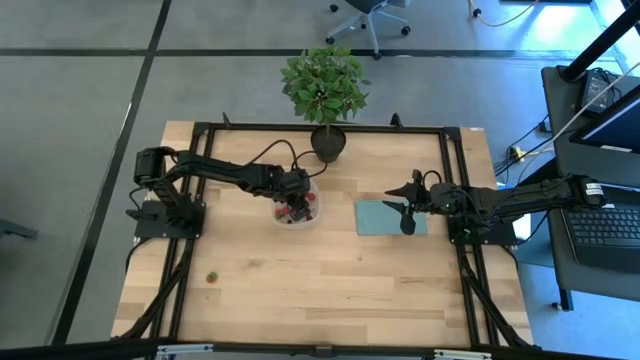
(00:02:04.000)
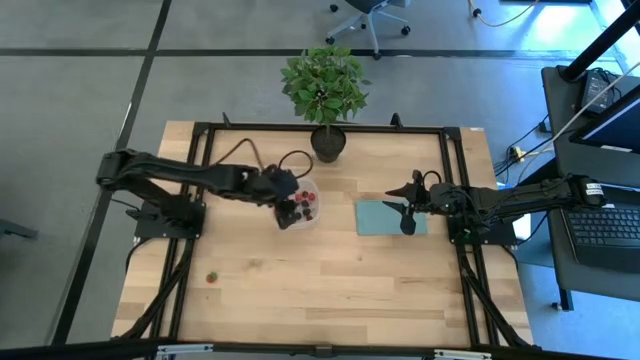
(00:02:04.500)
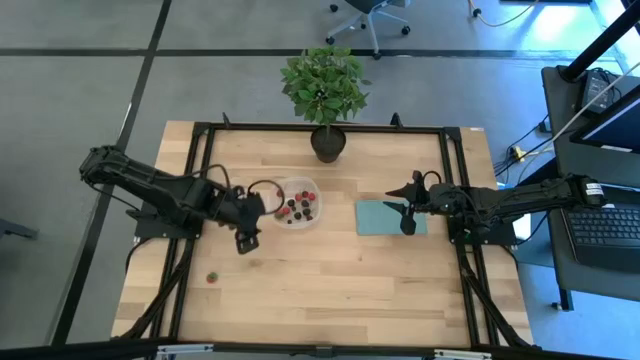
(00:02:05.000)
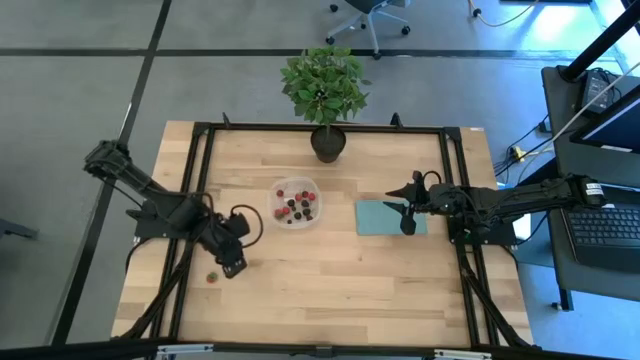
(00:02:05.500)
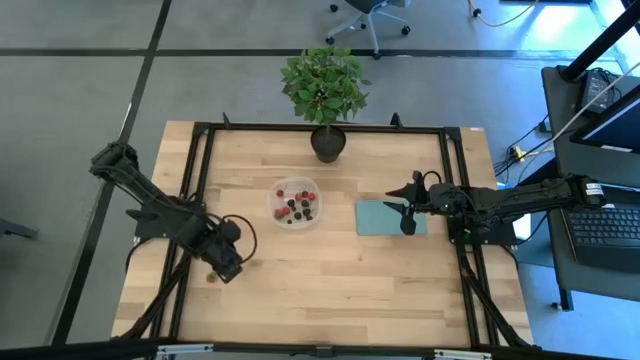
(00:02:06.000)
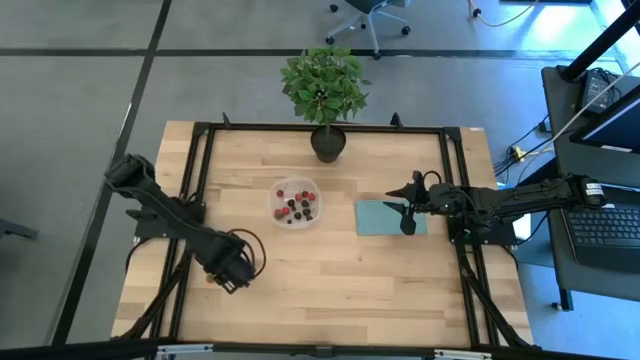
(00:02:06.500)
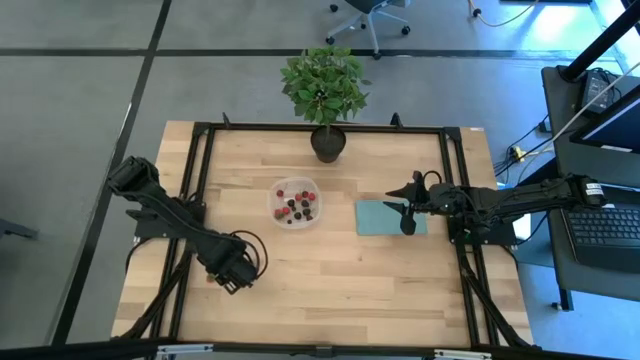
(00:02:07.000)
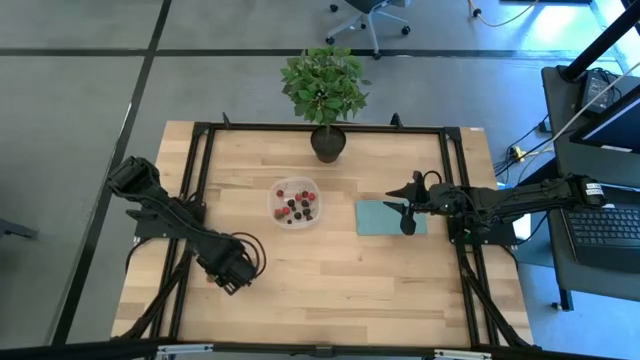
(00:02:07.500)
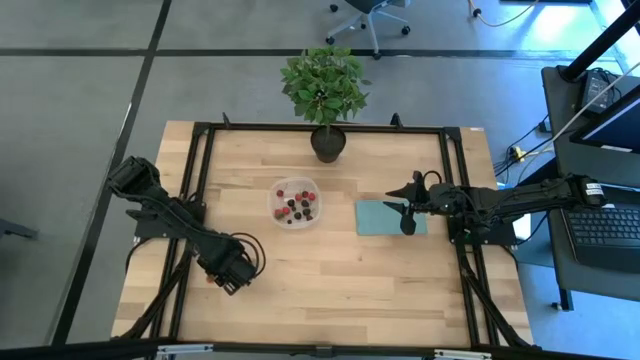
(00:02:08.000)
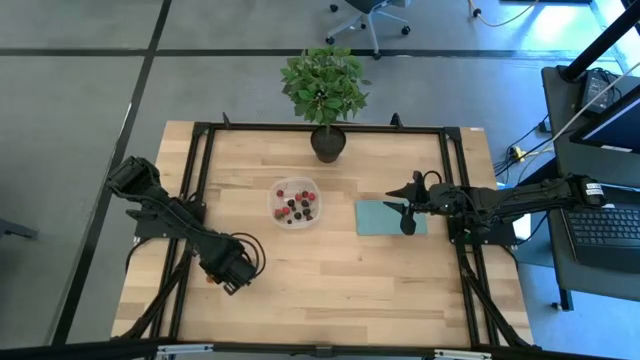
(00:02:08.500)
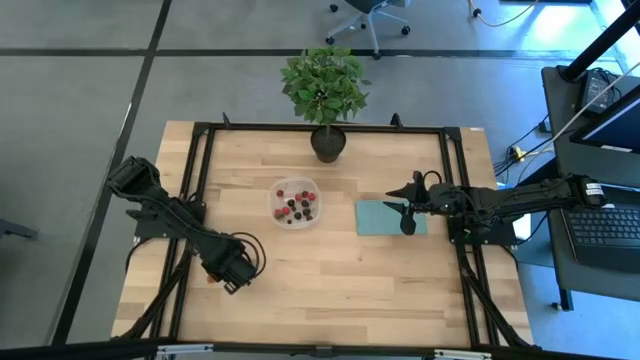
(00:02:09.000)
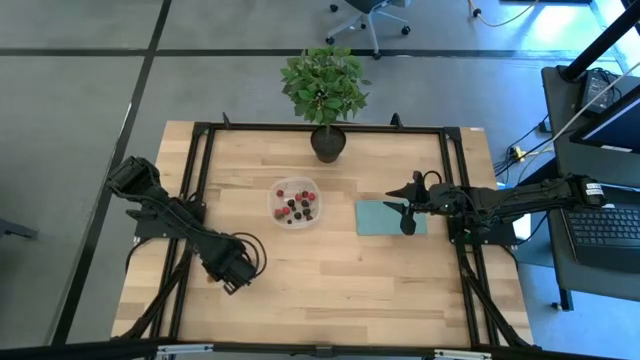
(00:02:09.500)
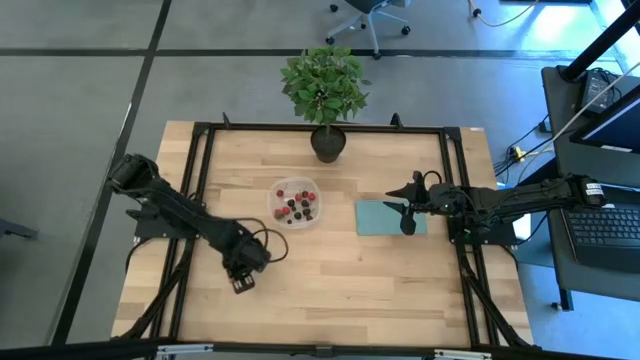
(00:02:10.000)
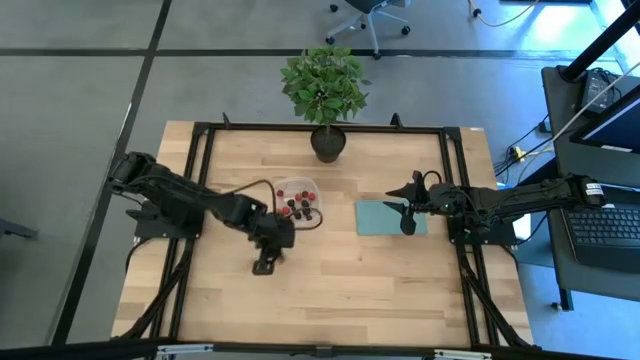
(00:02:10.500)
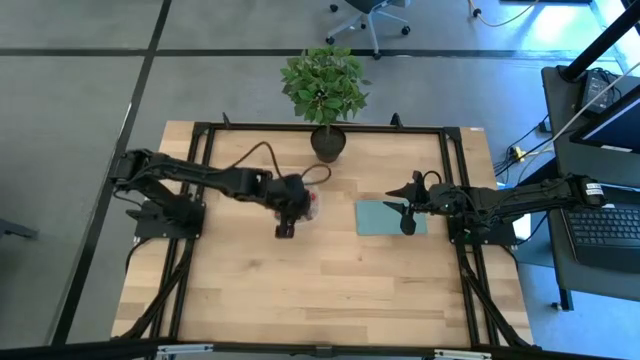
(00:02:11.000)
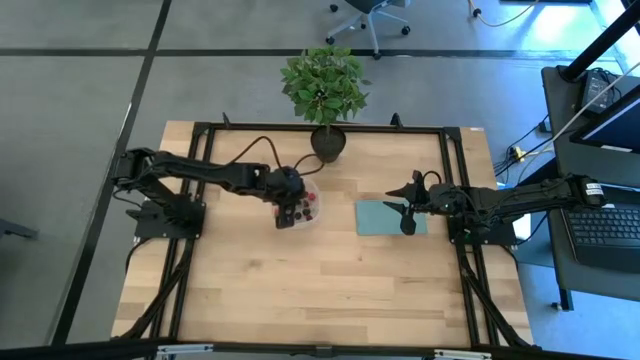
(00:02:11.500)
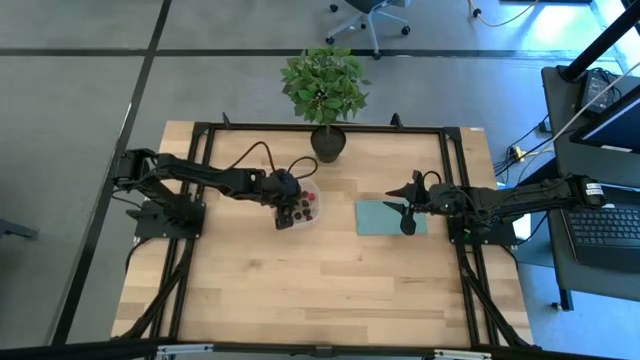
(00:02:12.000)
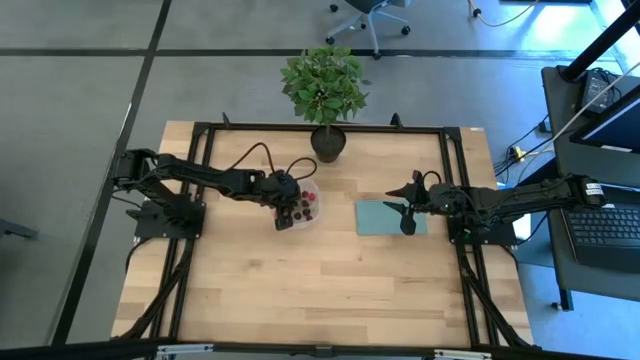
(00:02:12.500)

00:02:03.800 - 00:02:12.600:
Task: Pick and placing Produce into tupperware
Put the strawberry into the container

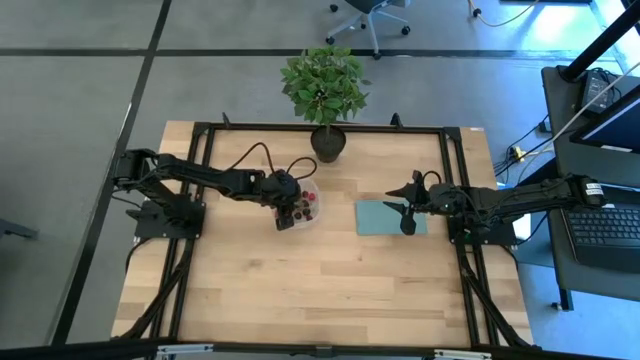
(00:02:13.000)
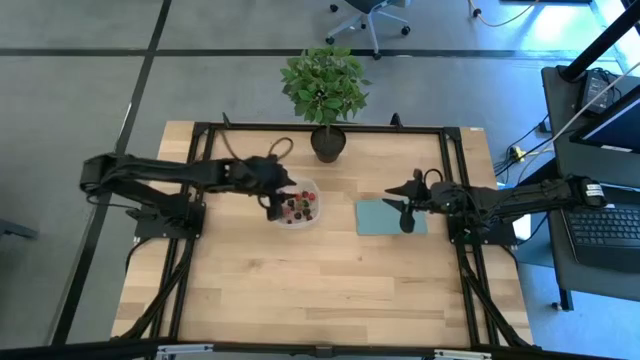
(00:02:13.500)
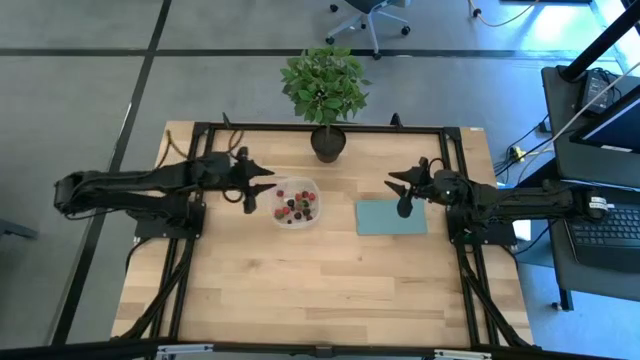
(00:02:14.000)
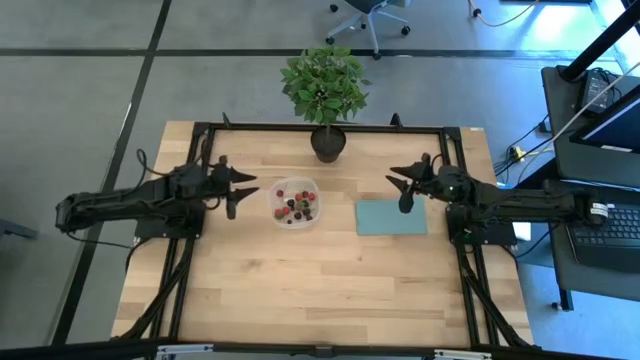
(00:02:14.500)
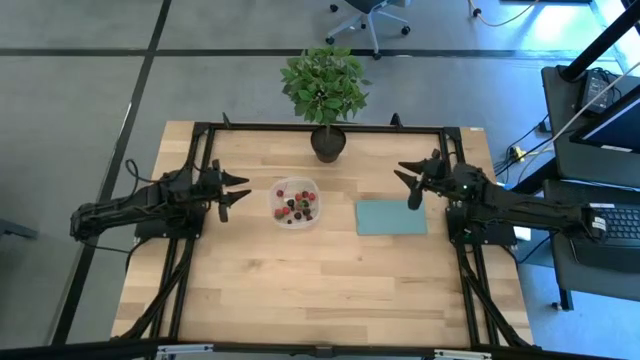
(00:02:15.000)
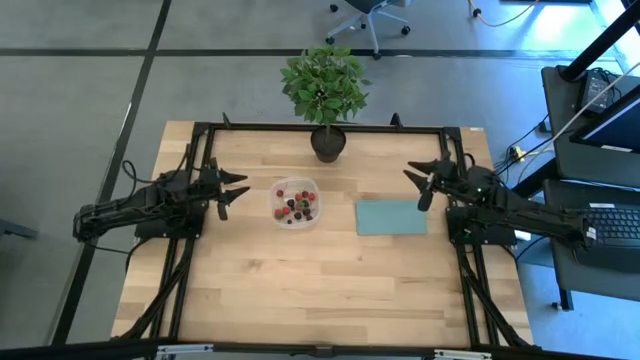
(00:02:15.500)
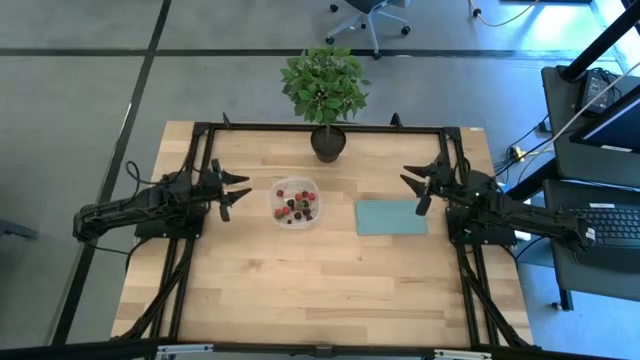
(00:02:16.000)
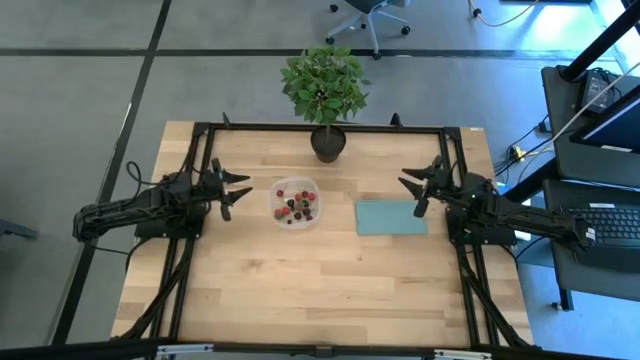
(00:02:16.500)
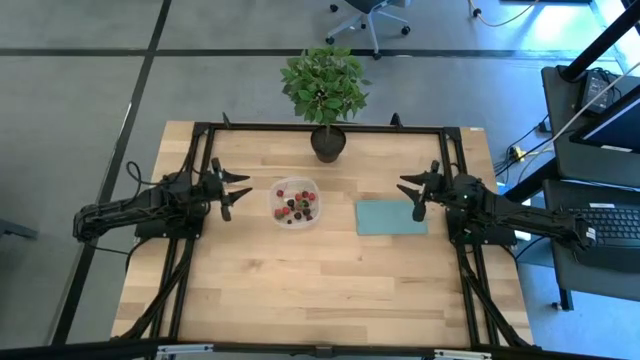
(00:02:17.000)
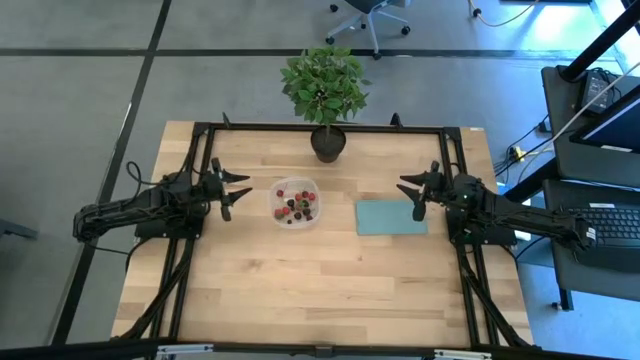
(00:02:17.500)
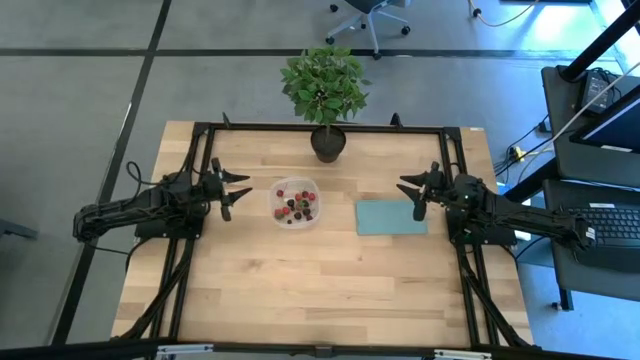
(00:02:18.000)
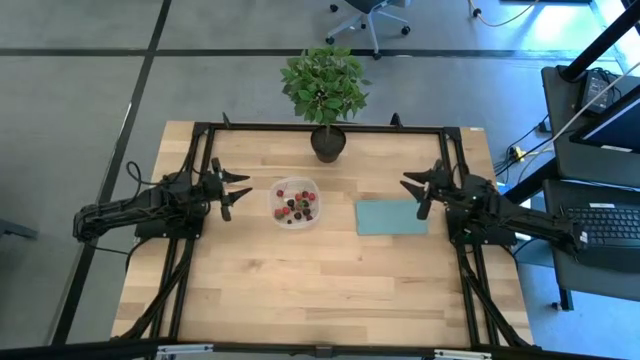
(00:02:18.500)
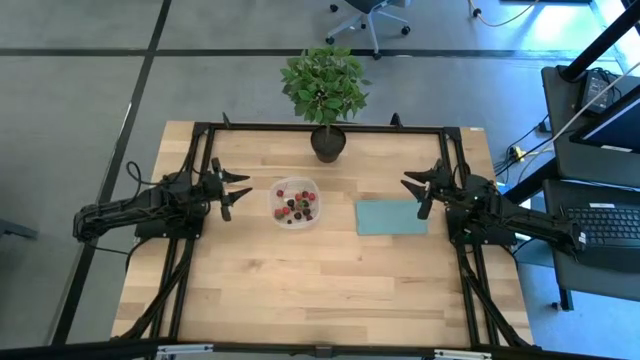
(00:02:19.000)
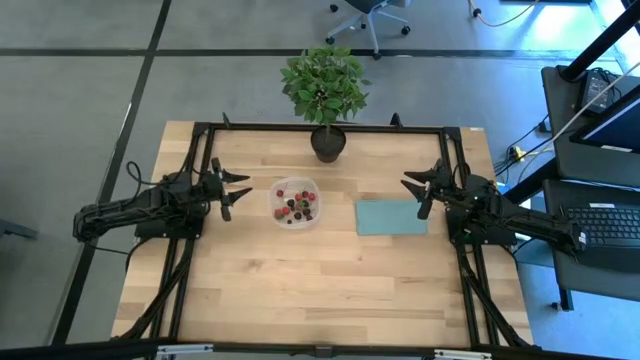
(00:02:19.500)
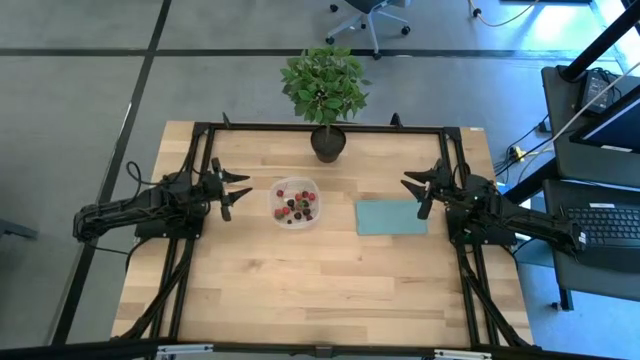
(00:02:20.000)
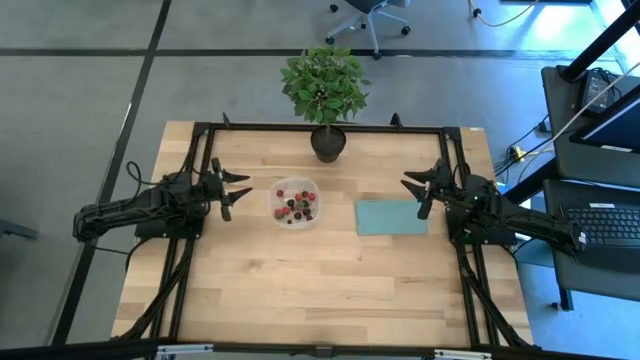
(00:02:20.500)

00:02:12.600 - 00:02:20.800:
Return to Home Position

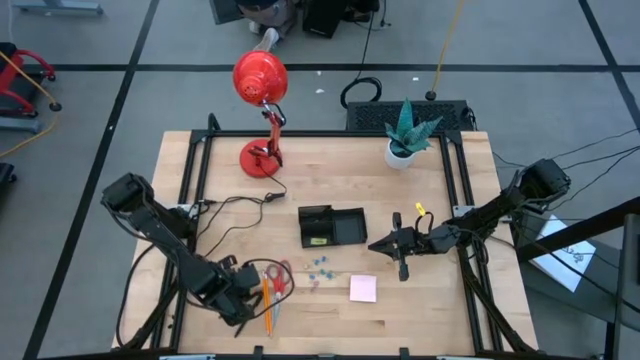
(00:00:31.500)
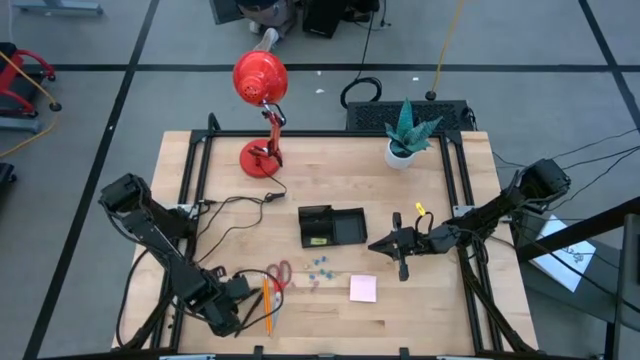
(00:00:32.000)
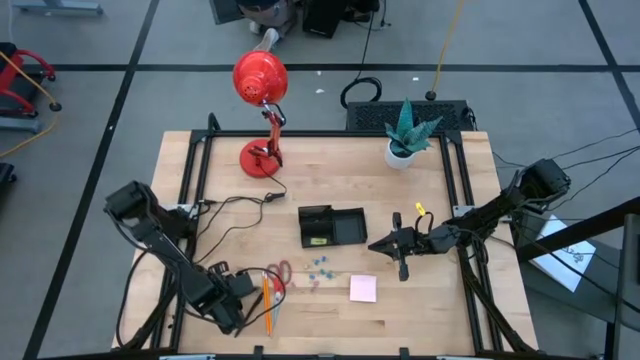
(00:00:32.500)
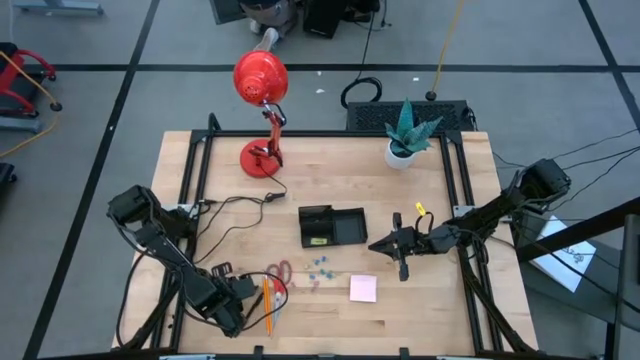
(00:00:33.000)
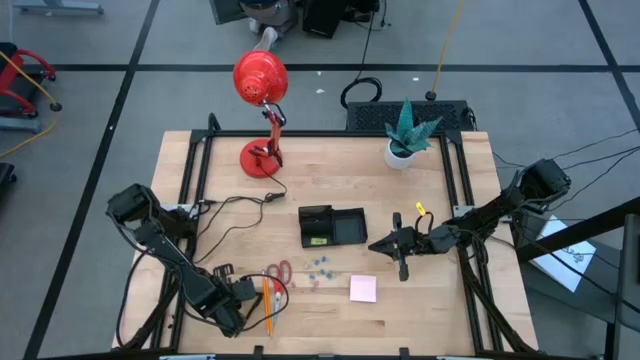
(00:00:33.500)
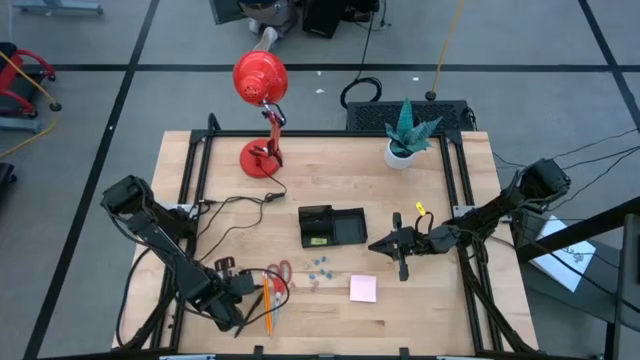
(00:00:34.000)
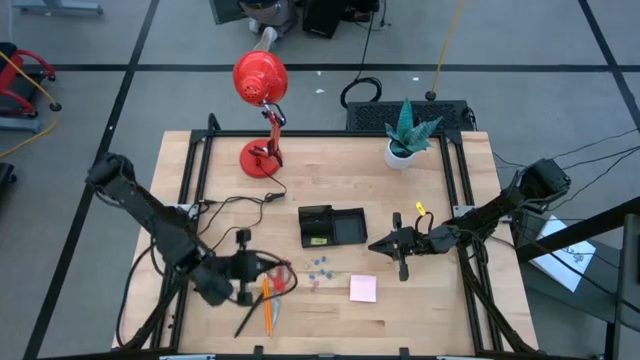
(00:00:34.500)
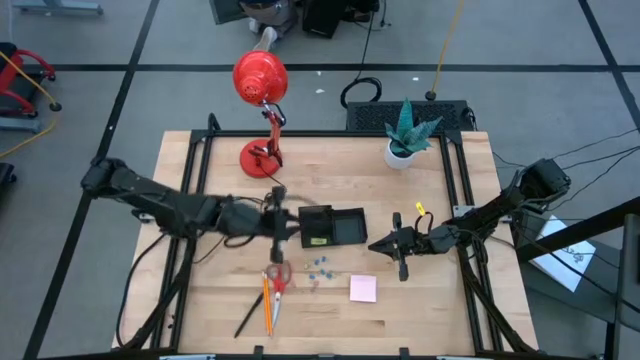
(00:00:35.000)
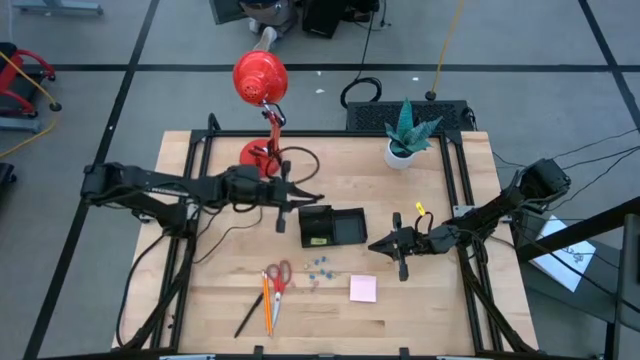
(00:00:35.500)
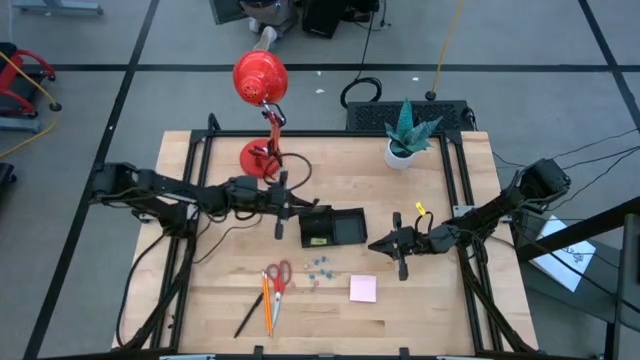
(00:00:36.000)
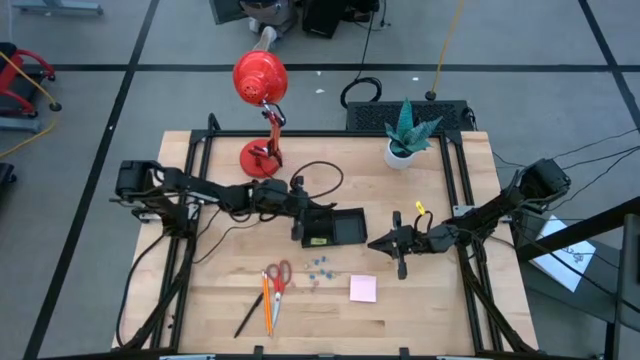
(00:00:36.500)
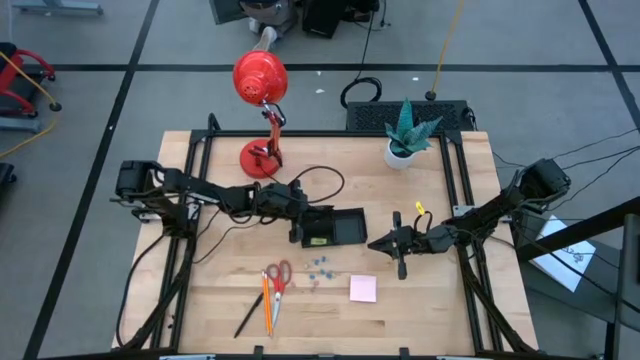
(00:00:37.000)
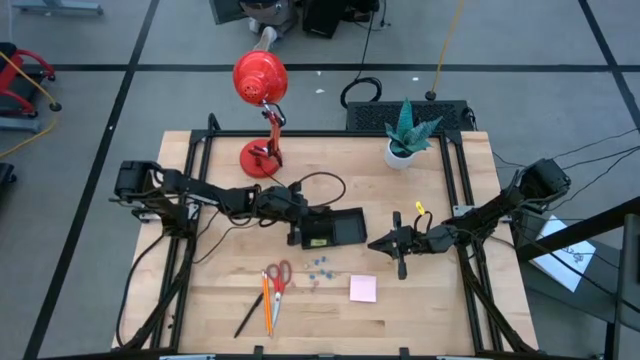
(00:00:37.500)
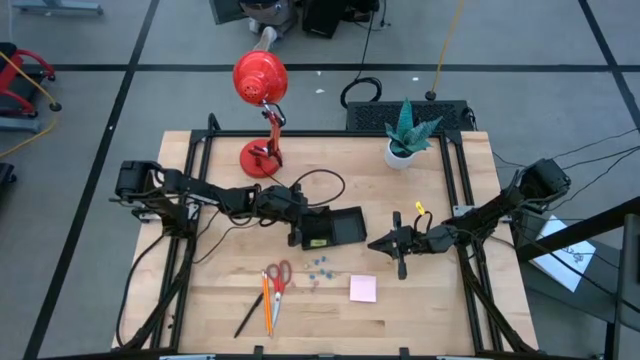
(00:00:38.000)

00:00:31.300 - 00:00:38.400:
Task: Pick and place office supplies into organizer
Put the black pen into the desk organizer
